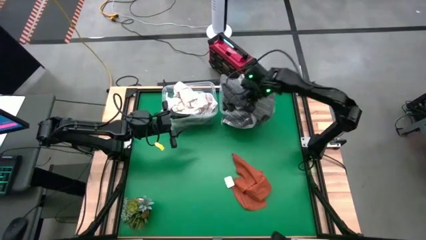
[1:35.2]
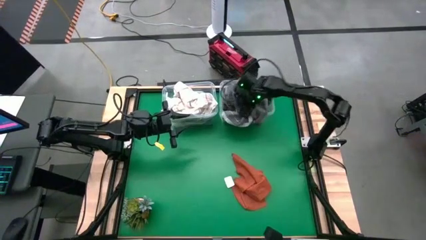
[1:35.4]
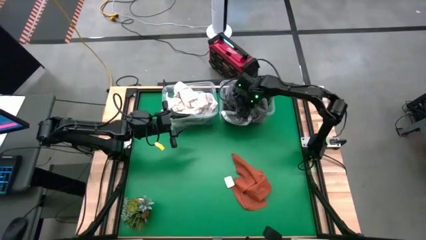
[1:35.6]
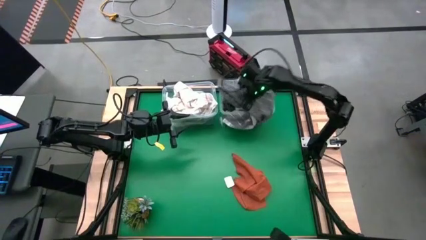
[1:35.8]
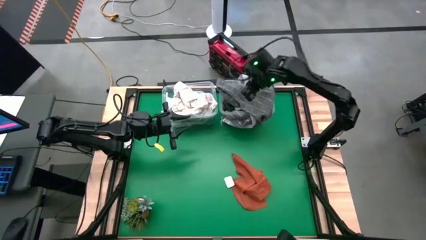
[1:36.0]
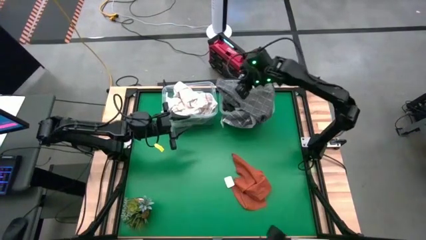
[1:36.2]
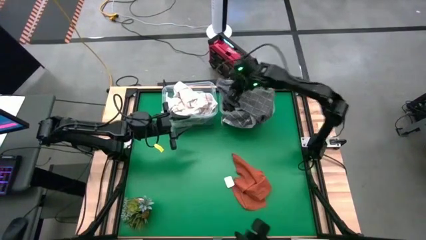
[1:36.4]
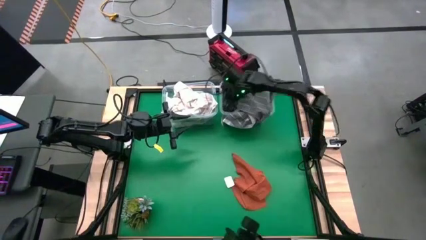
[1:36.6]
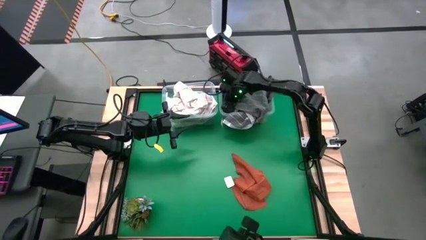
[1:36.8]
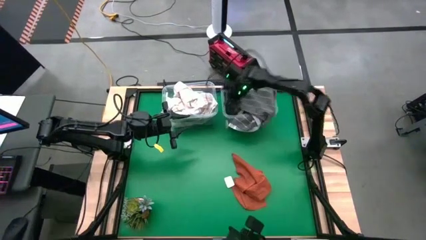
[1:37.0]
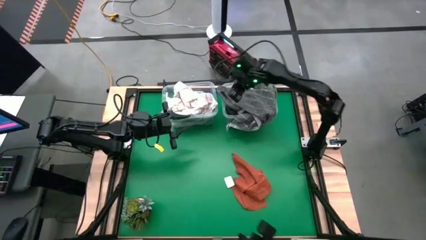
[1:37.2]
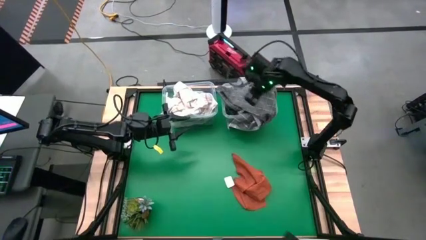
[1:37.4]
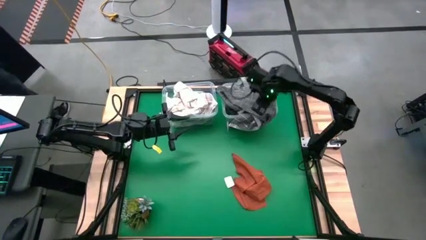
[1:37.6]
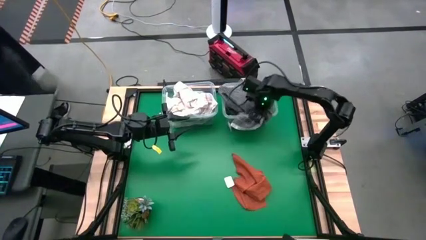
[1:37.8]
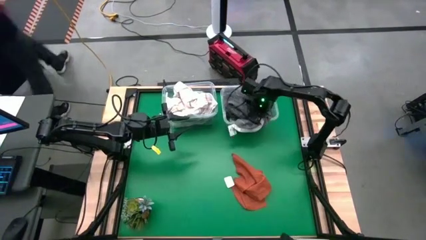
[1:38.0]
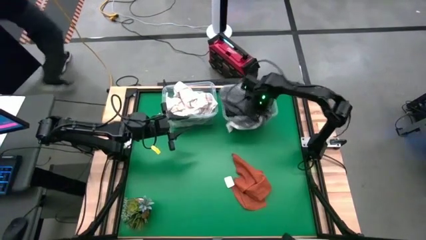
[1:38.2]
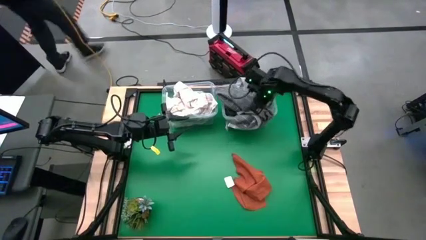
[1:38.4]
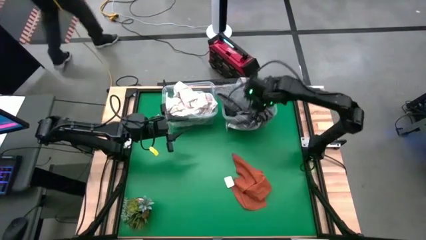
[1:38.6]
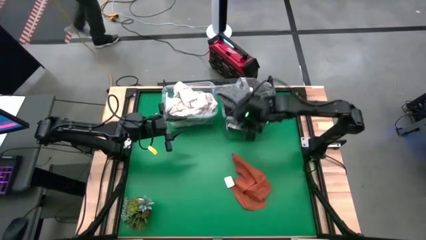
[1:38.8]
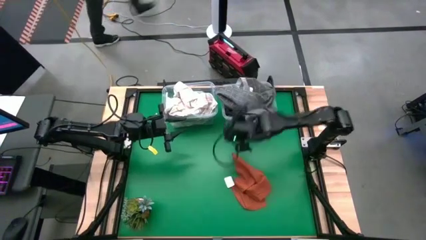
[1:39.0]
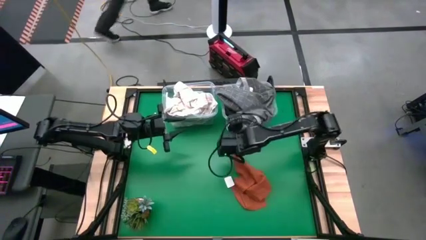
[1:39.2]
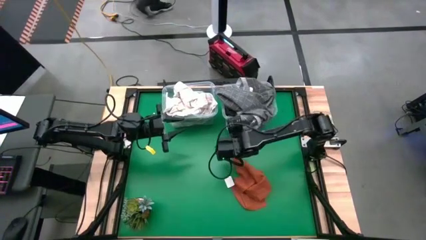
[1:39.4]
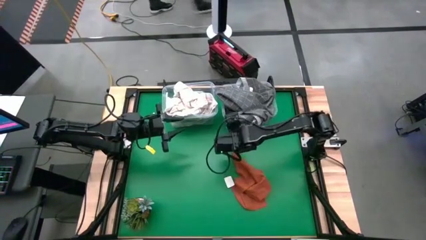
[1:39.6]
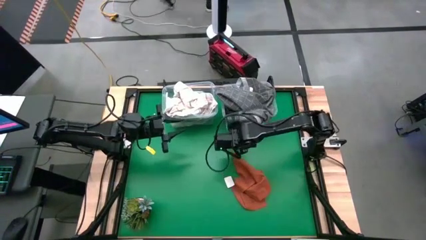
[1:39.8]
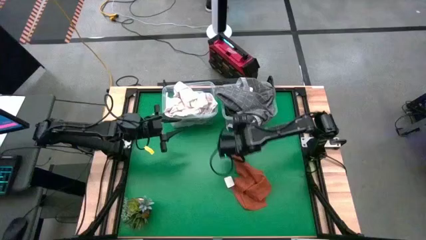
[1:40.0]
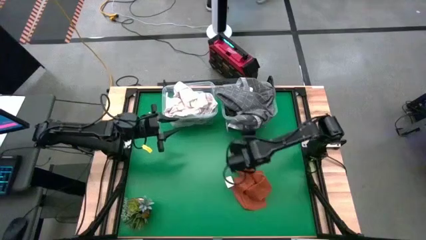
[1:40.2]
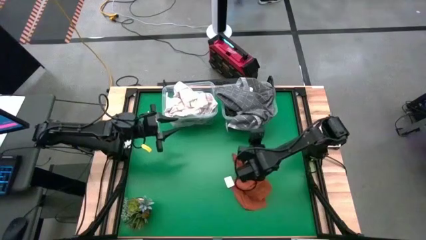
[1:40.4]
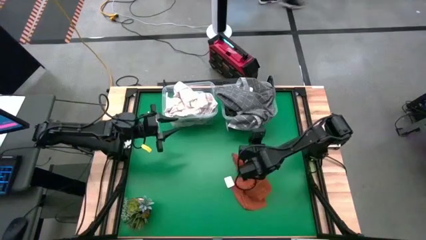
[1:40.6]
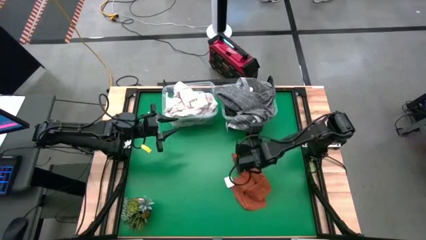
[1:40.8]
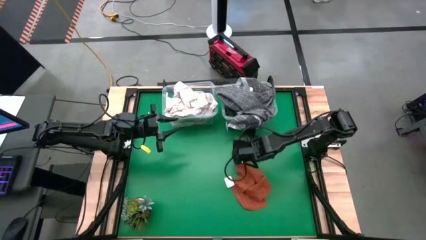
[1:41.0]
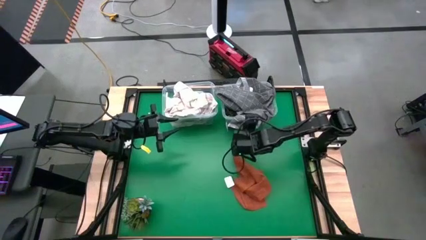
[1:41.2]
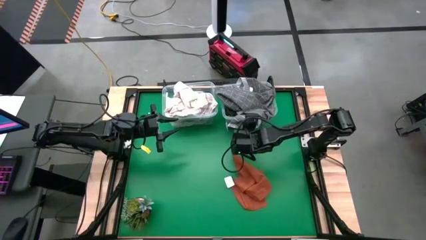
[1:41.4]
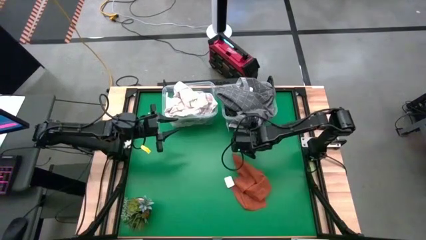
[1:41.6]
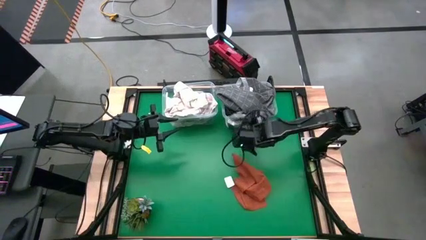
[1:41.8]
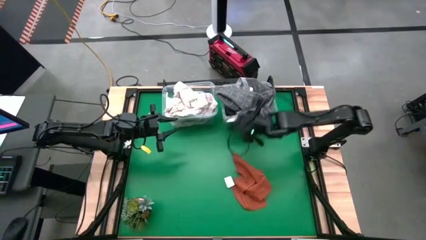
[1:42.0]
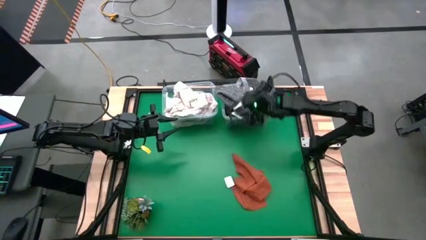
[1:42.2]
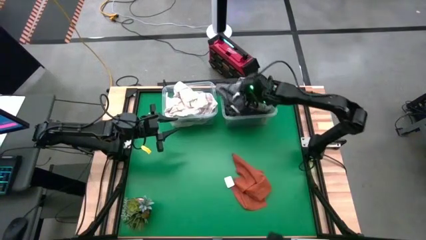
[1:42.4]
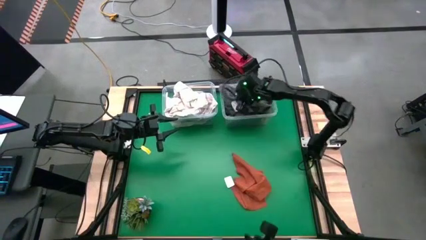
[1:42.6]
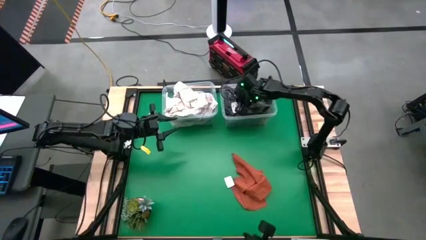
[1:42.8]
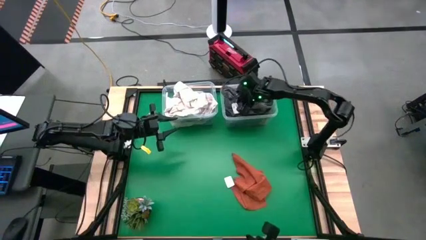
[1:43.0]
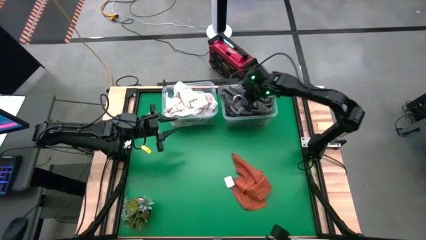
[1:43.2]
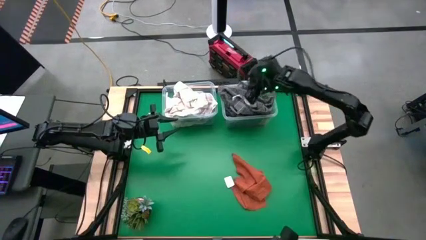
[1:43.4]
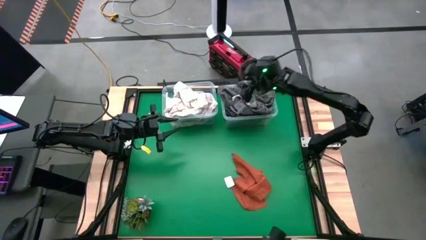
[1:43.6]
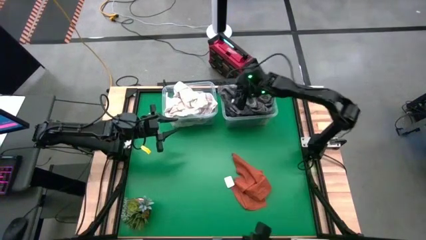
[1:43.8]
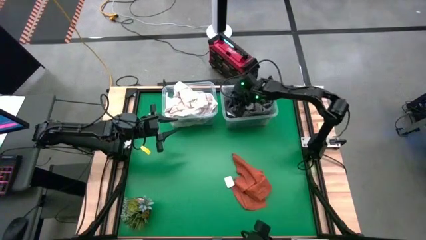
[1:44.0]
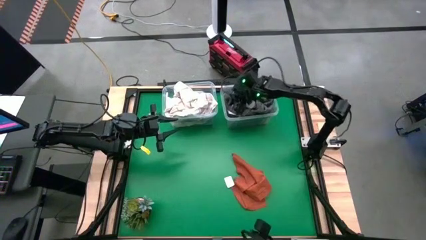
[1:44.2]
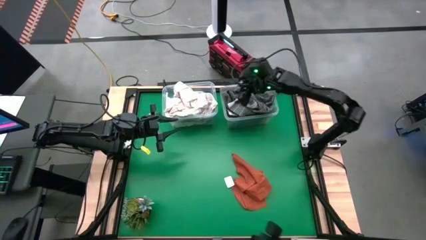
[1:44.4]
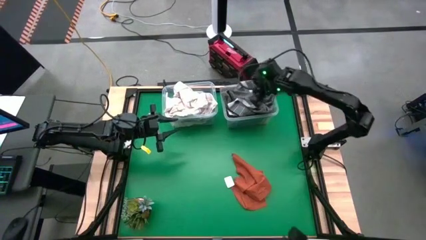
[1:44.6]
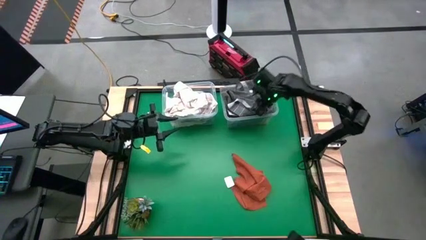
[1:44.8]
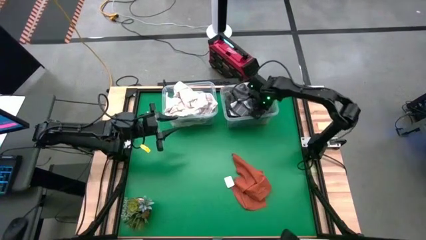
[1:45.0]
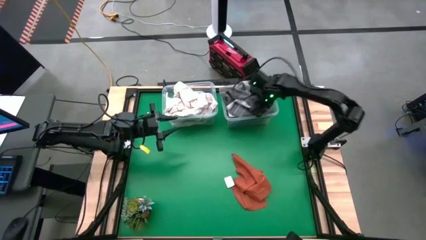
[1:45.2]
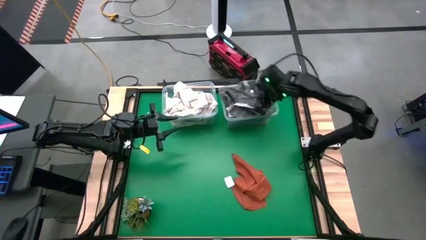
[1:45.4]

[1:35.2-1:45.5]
Task: Sort towels by color in basket
Put the black towel into the right transparent bin

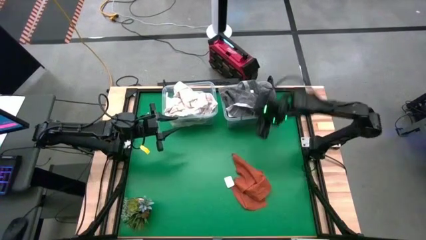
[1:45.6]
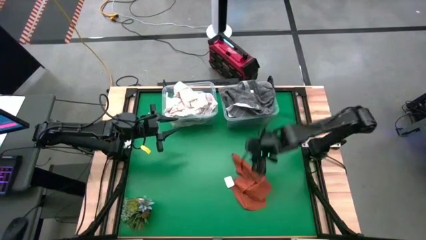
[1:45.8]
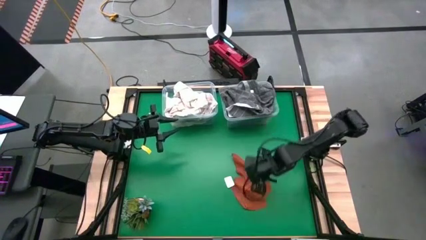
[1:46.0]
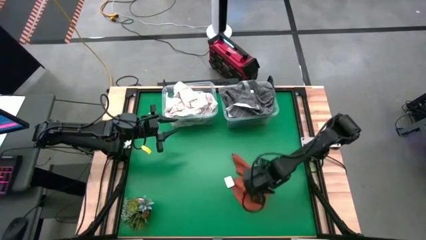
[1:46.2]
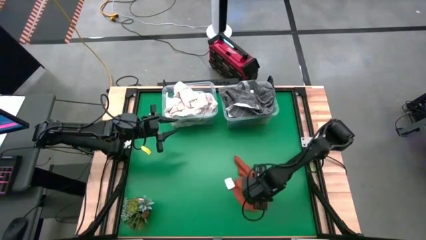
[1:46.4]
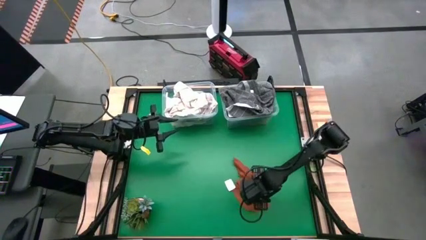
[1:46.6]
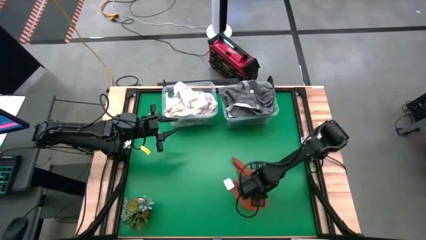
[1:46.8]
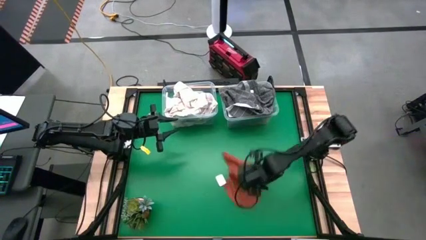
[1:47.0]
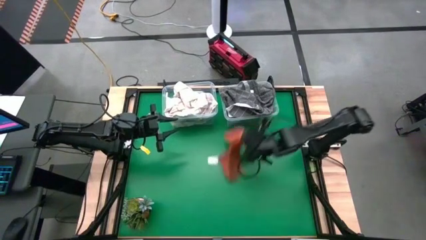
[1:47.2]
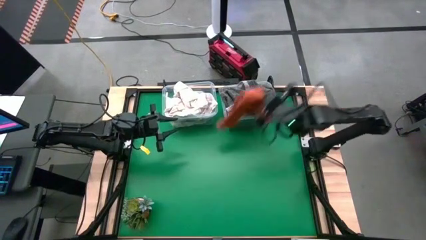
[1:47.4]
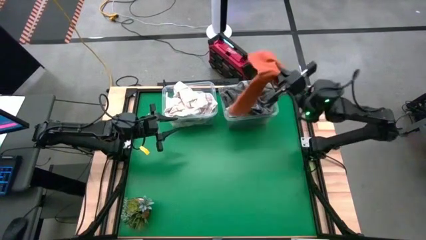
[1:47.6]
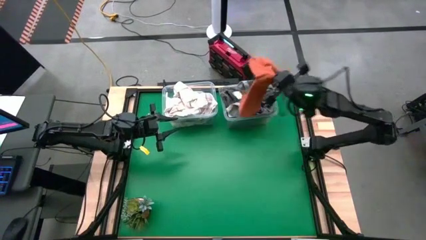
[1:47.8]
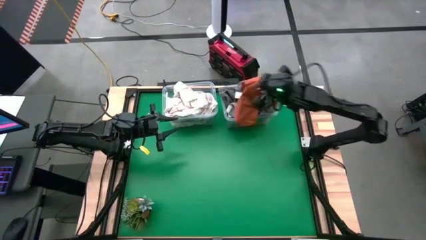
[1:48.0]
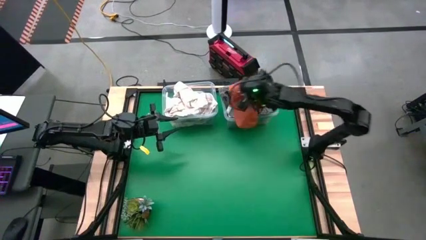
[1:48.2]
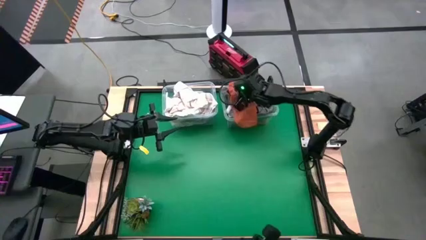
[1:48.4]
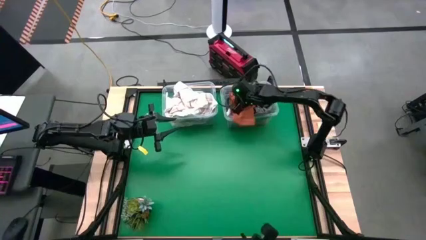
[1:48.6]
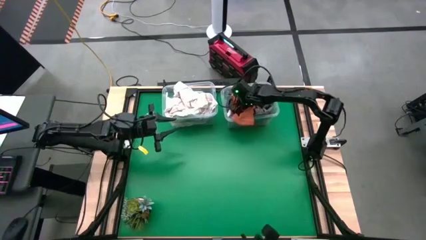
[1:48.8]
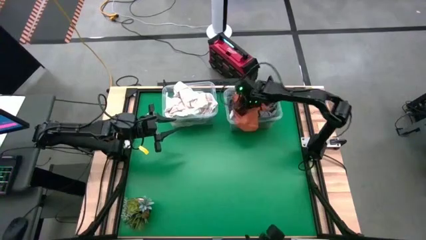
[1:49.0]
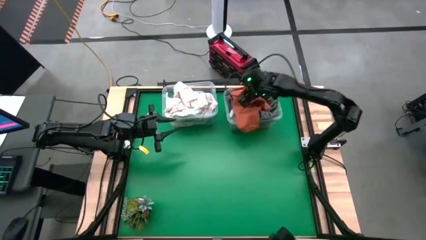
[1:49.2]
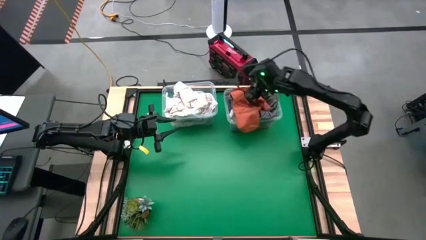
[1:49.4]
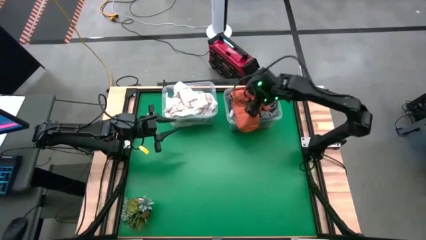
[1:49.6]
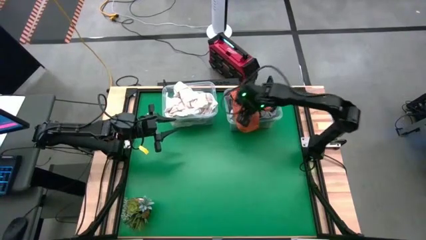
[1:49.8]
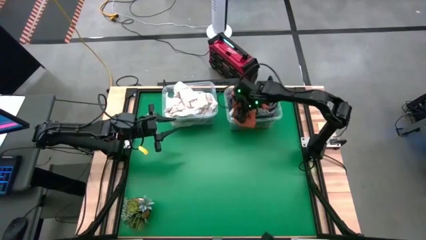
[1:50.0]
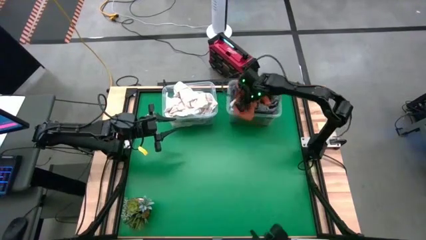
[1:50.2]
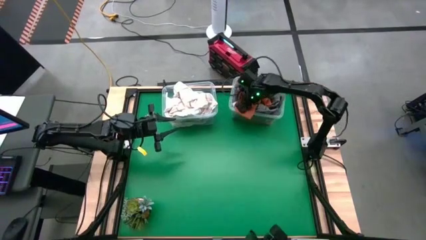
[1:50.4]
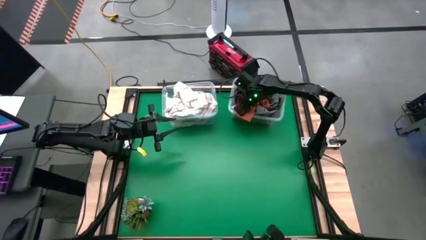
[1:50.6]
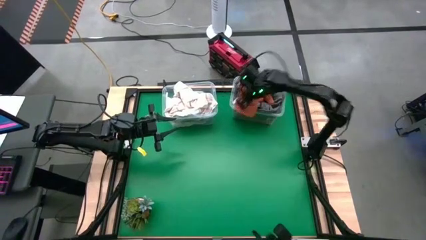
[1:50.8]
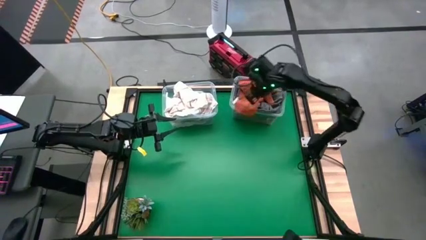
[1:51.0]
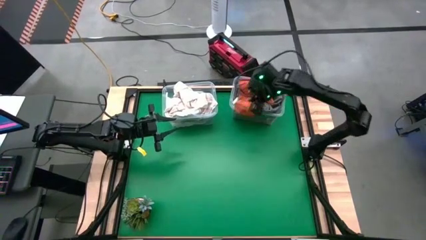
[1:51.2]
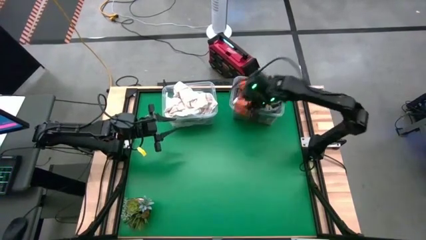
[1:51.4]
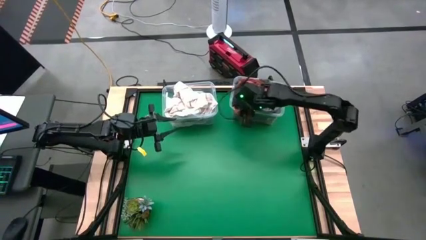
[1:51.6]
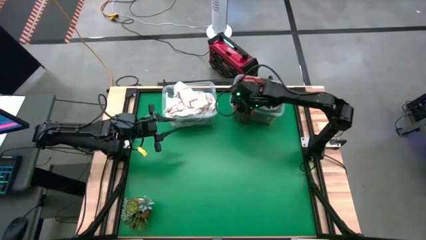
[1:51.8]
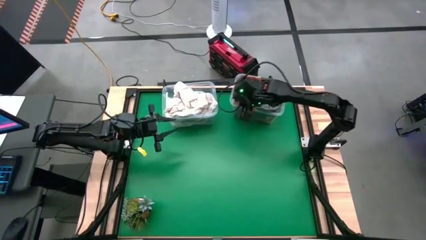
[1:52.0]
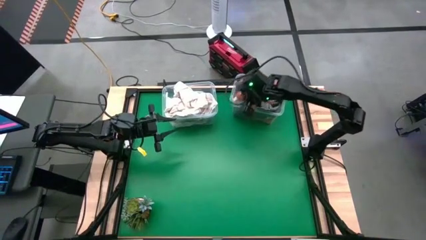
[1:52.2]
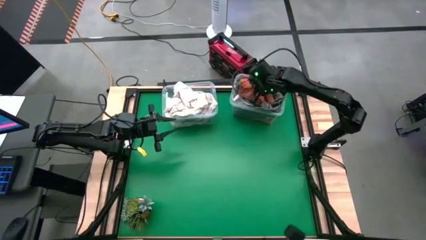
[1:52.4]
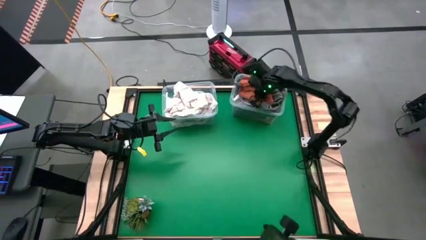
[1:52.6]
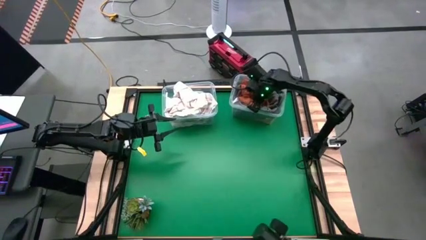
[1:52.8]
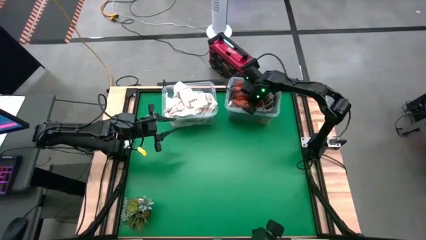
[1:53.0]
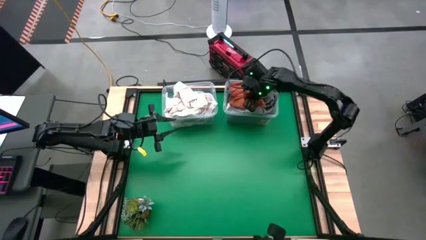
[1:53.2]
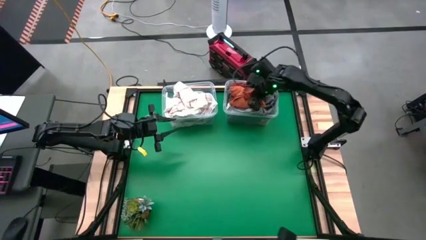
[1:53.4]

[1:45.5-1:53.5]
Put the orange towel into the right transparent bin
